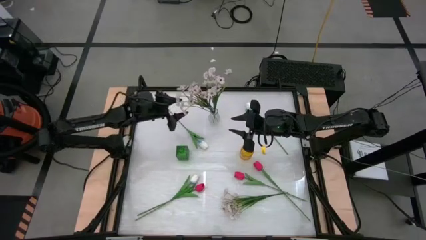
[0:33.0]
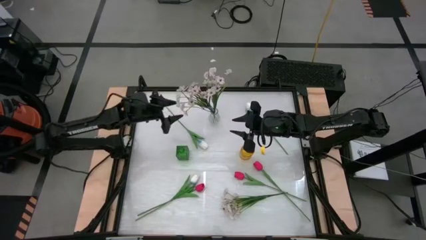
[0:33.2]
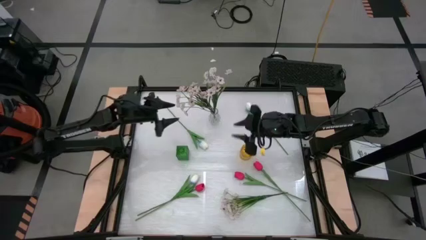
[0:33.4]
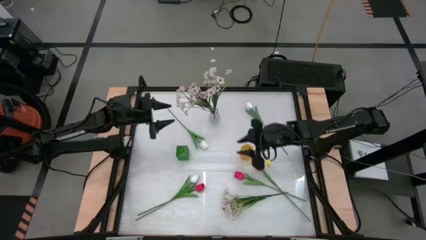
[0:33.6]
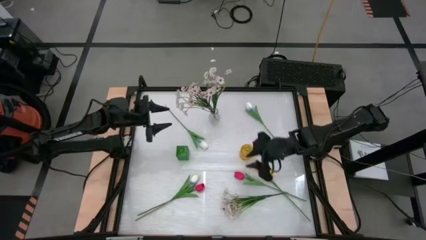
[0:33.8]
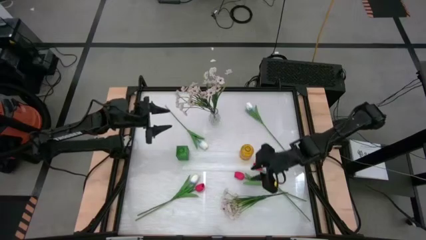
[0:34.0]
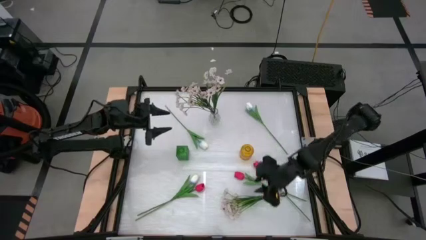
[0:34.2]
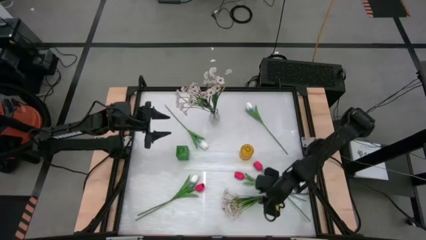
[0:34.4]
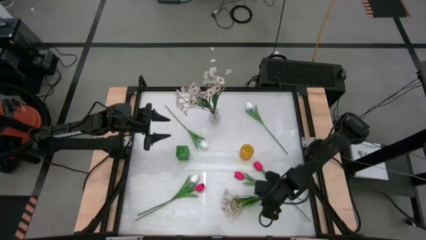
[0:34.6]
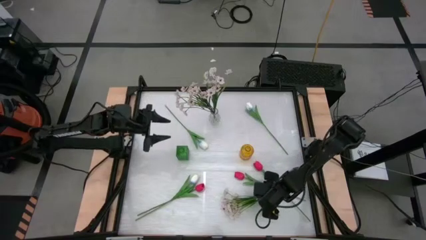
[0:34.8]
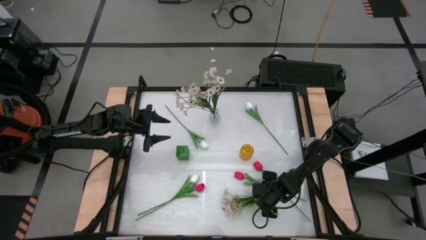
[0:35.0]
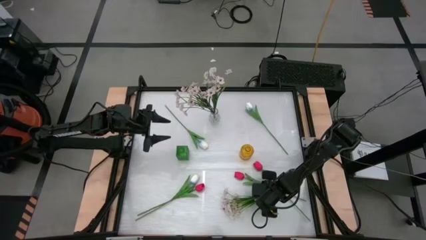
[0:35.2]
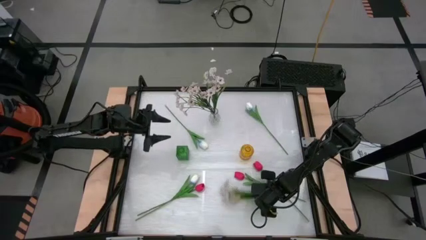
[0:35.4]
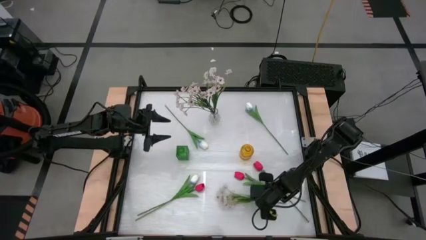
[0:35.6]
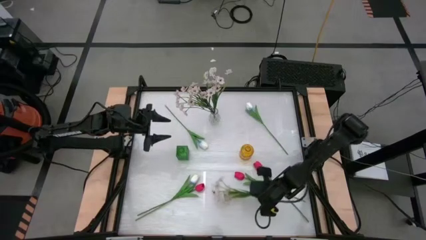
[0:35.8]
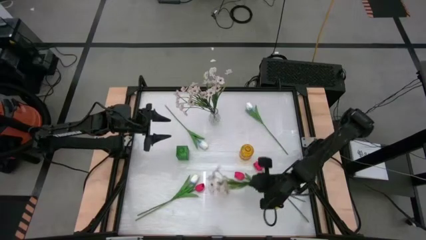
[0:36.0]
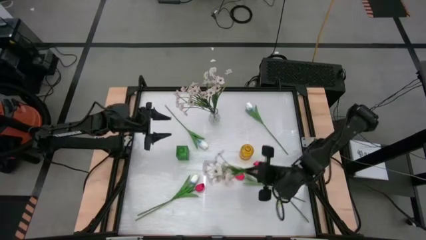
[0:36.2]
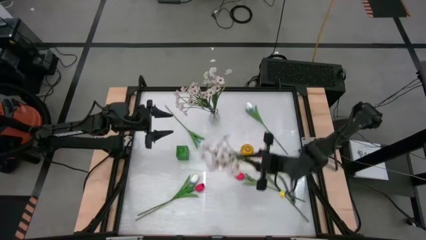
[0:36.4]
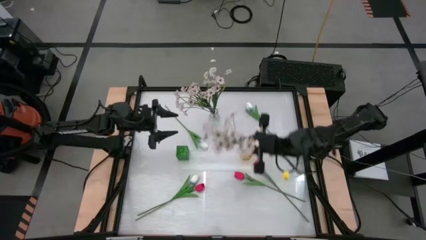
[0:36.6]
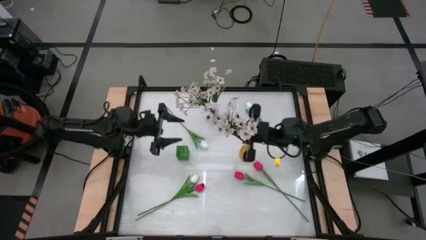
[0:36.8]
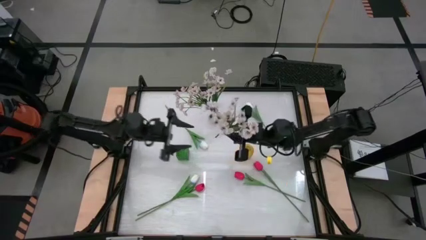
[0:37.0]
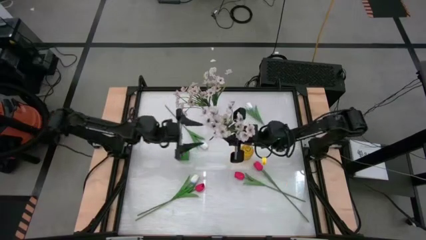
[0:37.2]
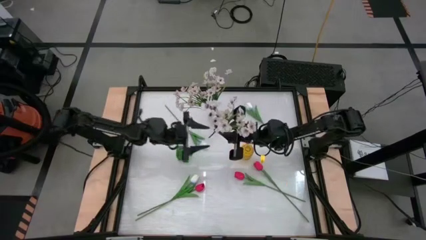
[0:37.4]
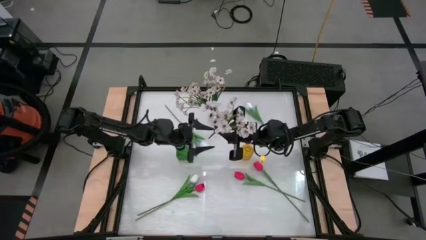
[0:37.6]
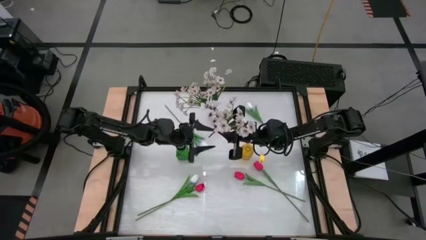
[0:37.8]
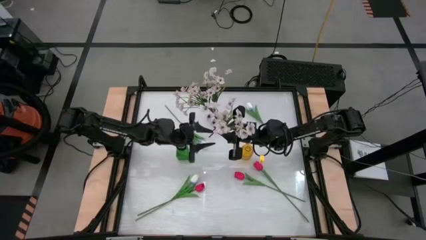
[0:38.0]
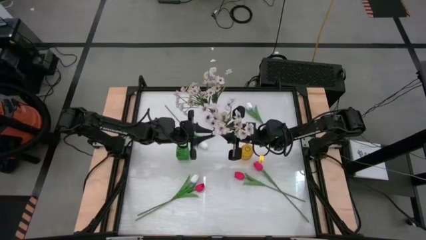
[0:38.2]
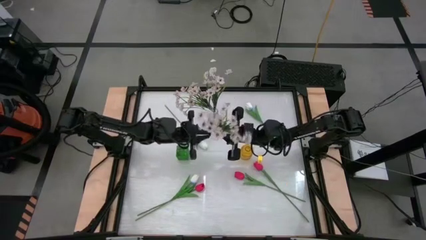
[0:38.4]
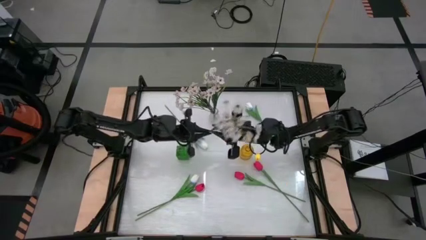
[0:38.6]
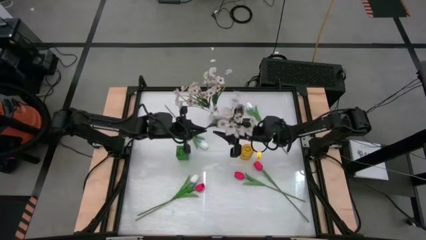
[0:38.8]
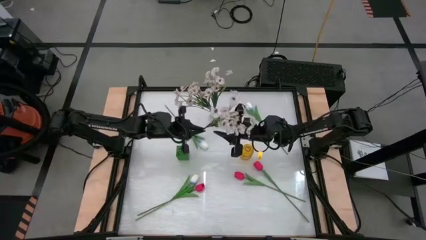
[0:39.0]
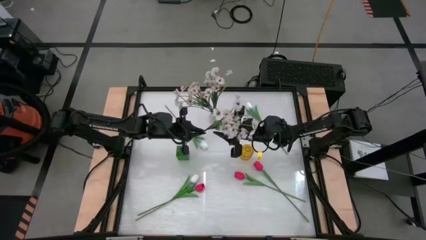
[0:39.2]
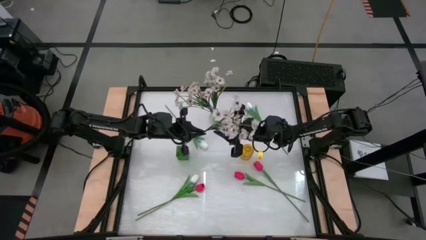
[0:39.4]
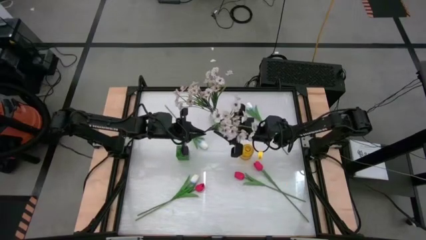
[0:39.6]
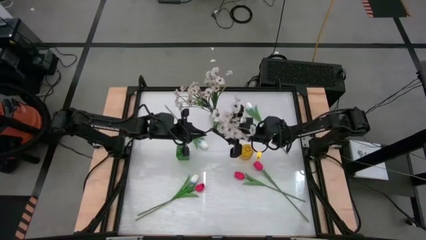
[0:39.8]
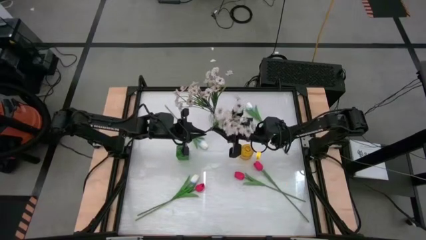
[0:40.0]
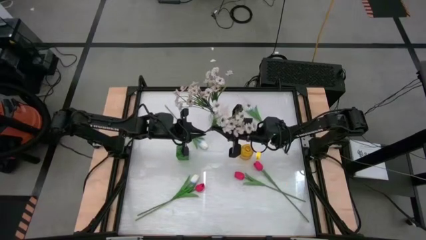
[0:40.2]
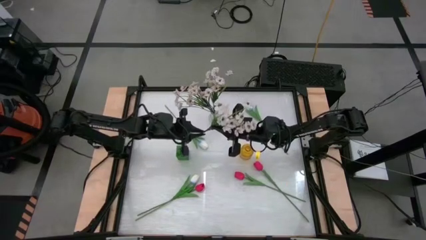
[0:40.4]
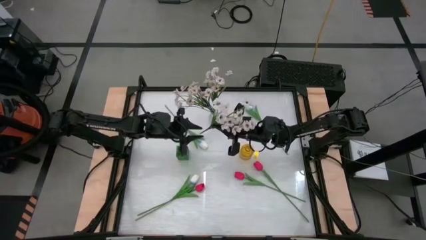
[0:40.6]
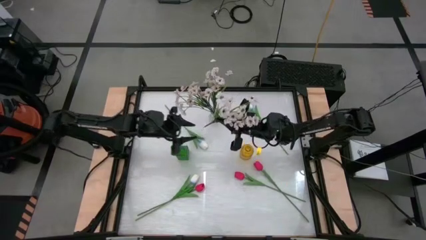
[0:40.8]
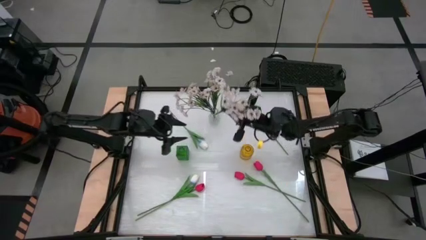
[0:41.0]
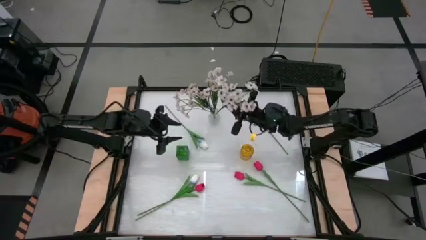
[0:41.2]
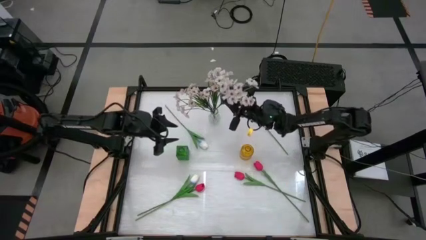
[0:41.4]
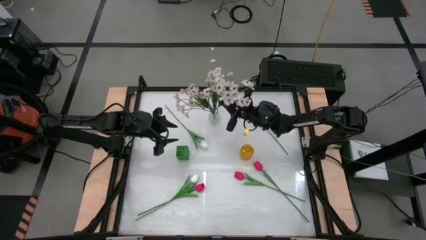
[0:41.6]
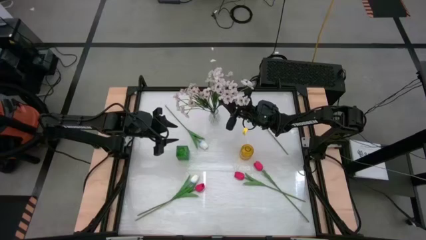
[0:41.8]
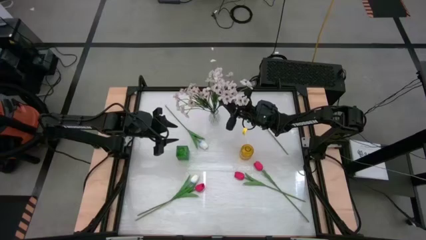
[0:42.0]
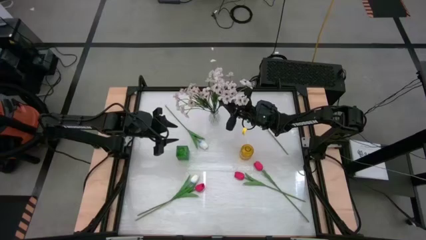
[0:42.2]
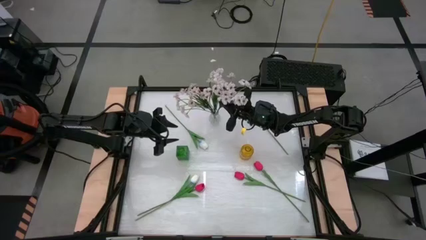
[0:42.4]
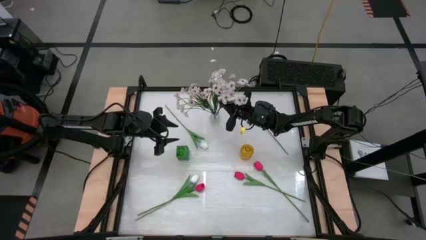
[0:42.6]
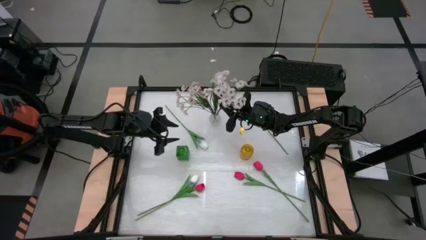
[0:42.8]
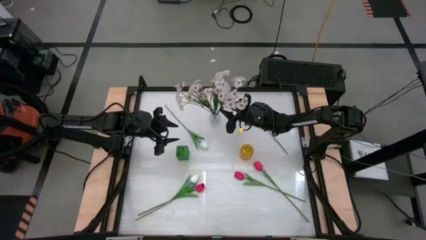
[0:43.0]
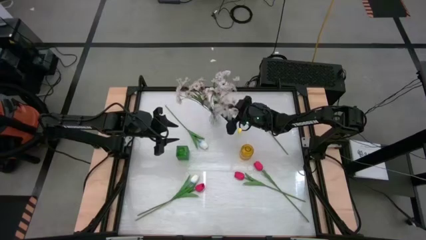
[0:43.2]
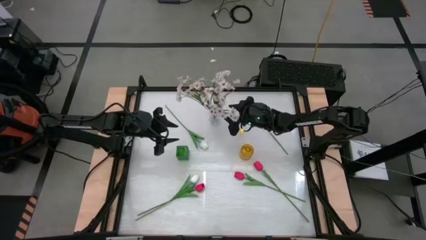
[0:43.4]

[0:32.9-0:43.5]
Task: Sort flowers into vase by color
Put the white flowers into the transparent vase
